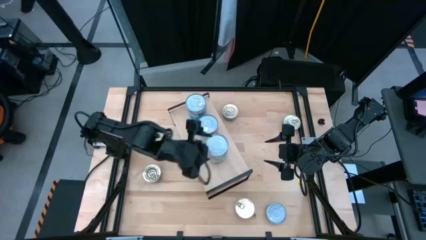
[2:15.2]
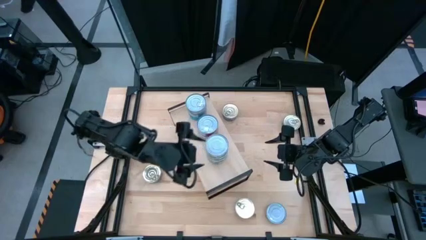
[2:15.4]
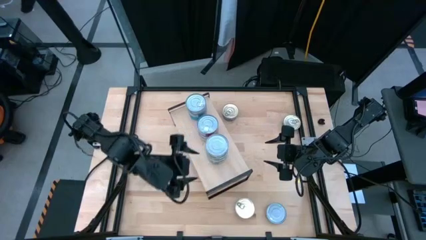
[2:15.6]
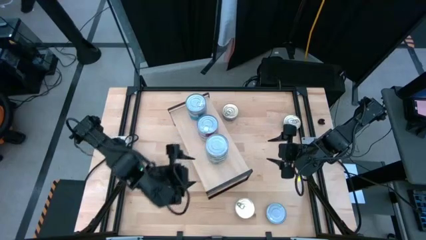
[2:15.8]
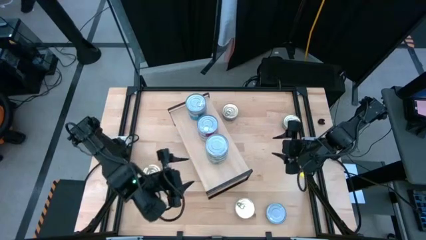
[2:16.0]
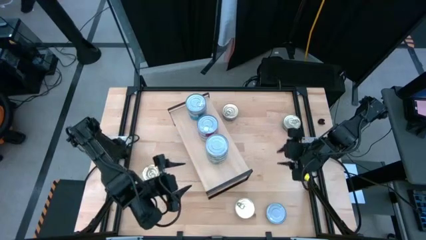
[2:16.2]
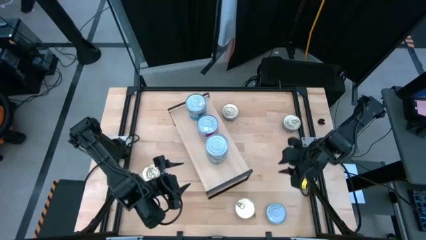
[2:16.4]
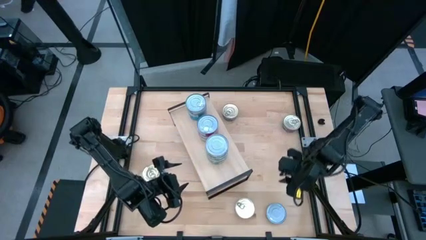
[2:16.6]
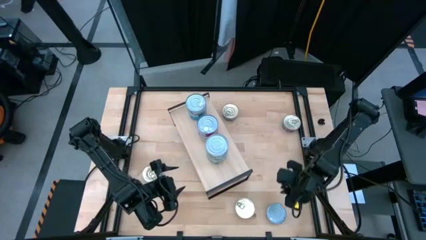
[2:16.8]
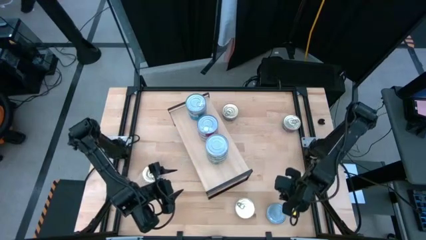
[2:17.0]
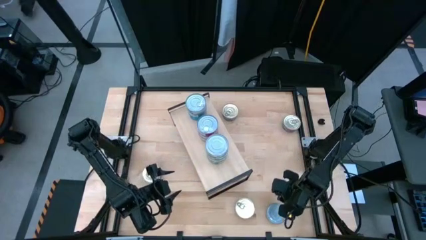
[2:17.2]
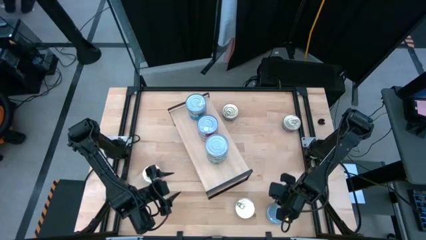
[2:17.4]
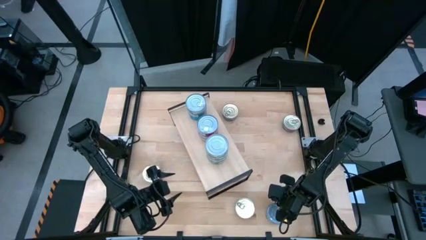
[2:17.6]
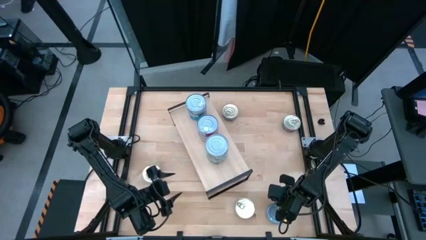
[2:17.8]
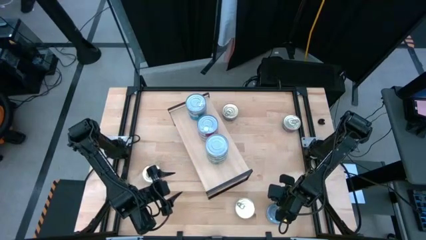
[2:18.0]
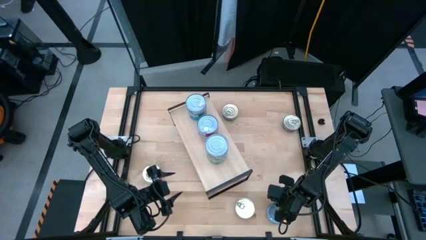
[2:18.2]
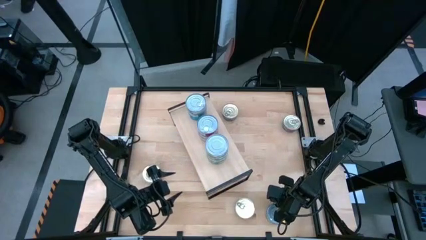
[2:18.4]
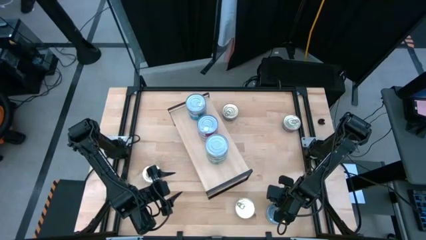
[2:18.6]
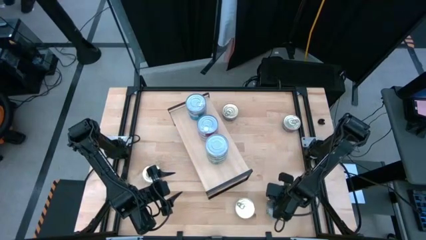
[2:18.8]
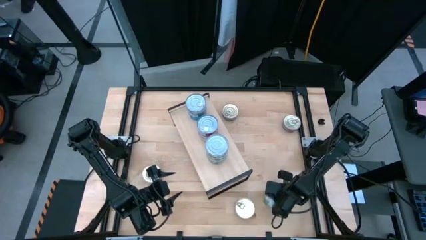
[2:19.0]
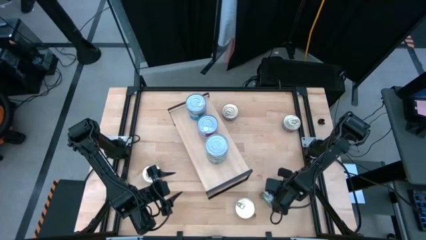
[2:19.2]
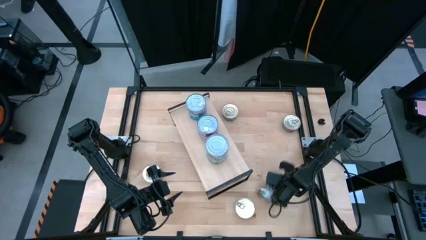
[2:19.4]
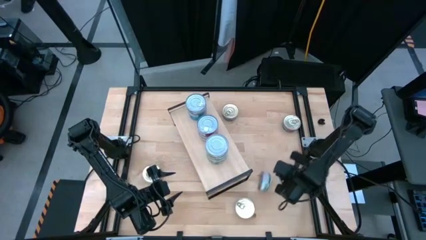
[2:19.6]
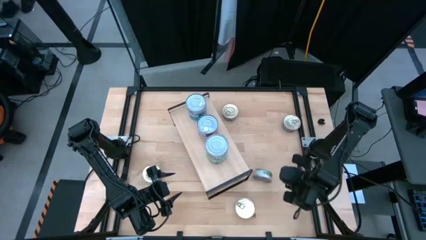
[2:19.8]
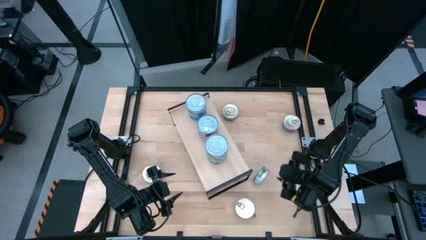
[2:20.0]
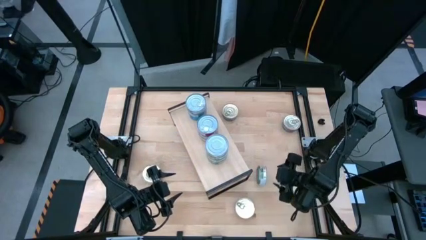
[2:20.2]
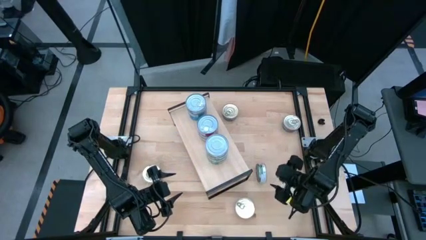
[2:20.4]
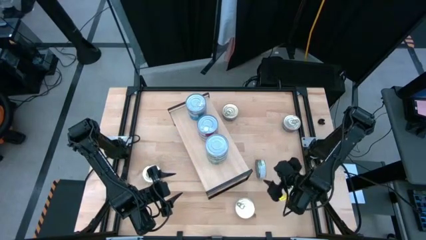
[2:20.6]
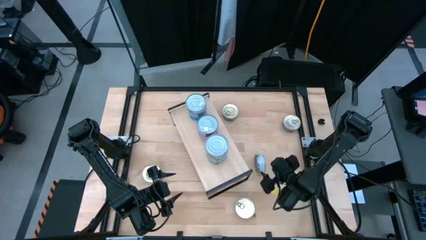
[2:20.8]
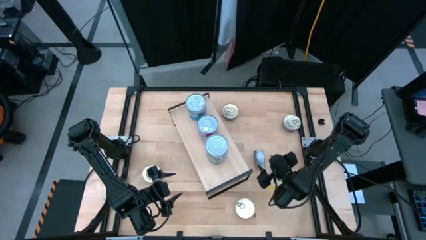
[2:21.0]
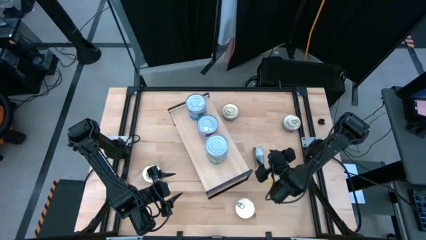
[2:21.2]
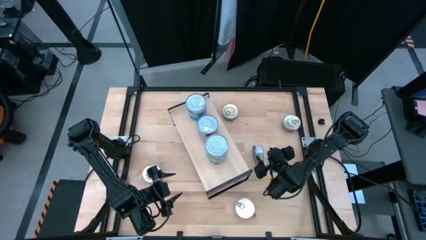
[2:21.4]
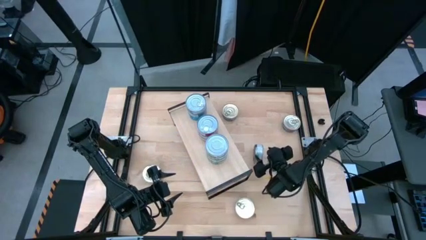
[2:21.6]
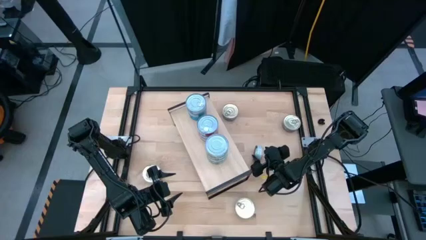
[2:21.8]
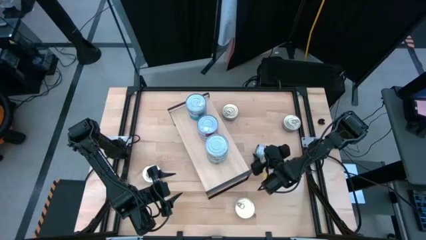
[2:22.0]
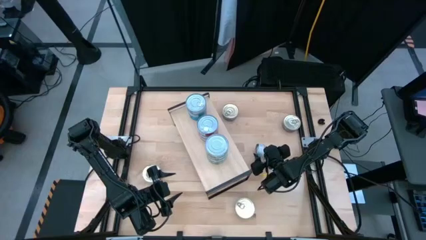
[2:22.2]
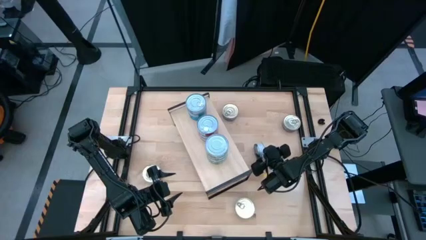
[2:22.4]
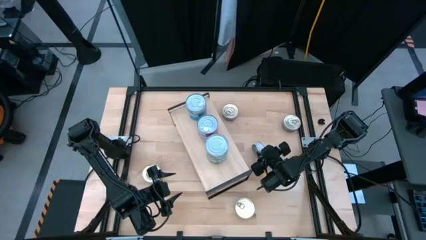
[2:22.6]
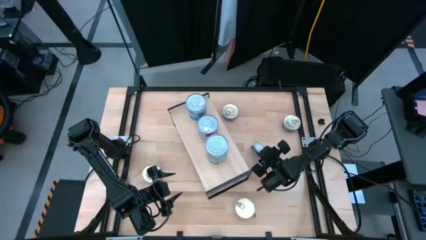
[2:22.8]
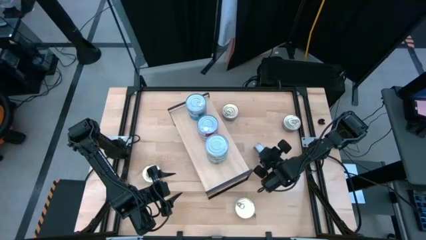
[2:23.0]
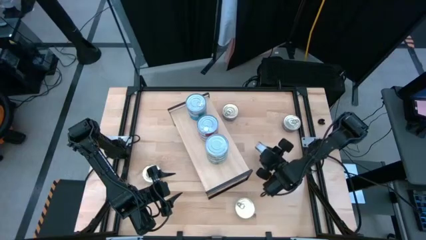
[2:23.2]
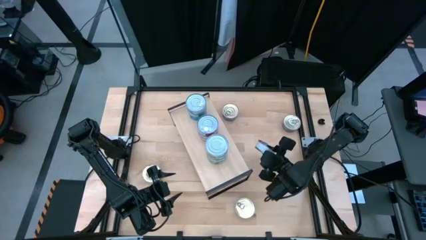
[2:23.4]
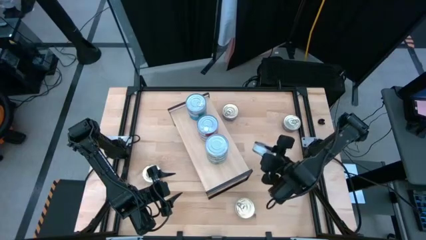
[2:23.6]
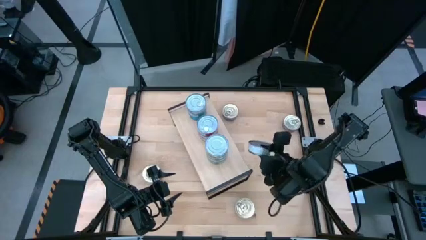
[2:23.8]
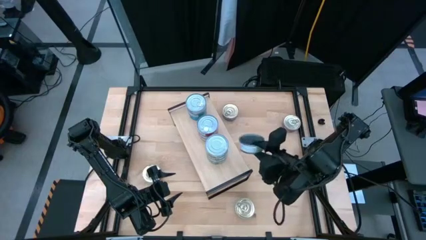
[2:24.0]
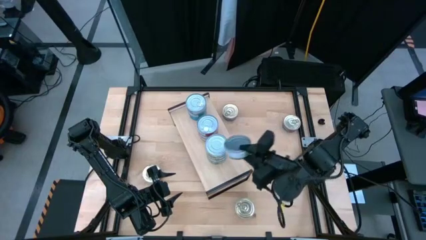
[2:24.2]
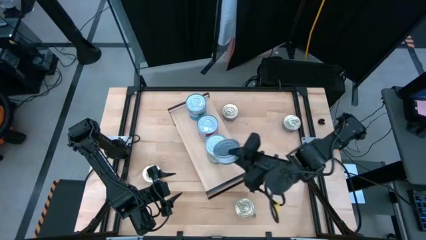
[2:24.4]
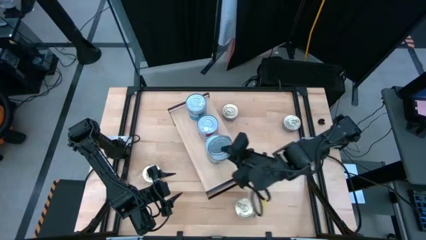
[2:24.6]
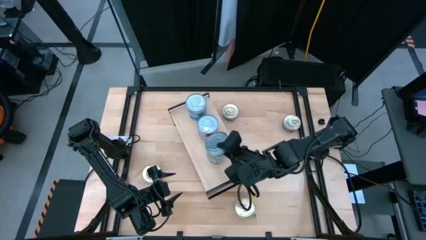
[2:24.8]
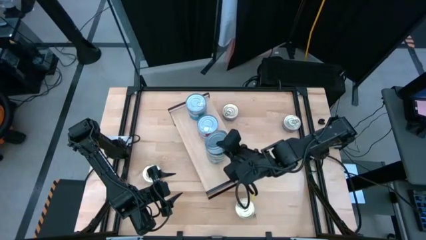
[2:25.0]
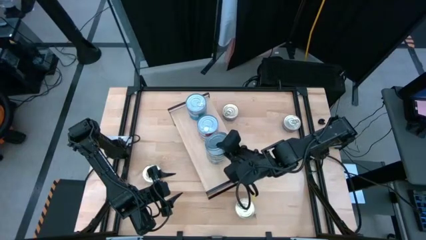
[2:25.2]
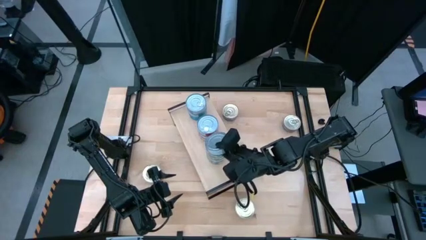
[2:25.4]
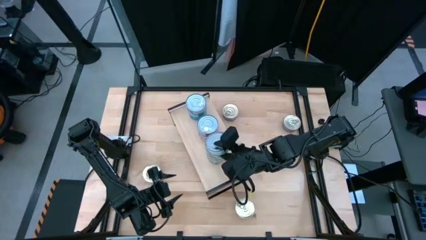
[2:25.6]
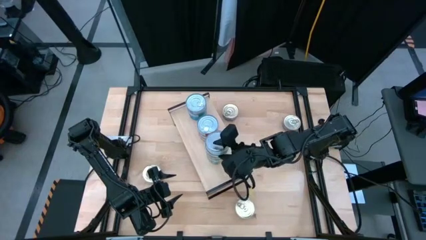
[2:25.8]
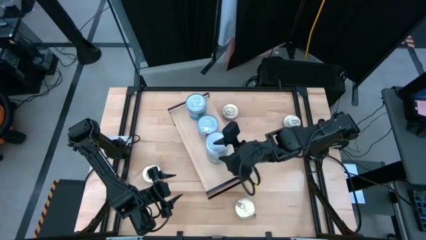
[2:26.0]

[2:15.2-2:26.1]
Task: Stack canned seafood by type on shelf
Stack the green tuna can on top of the green tuna cans on the shelf

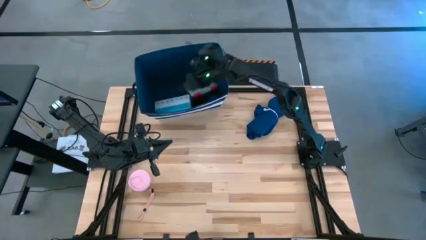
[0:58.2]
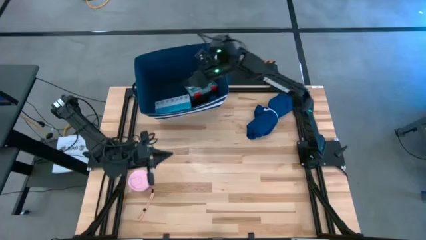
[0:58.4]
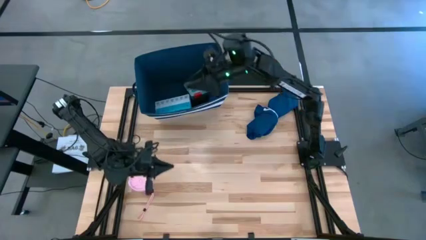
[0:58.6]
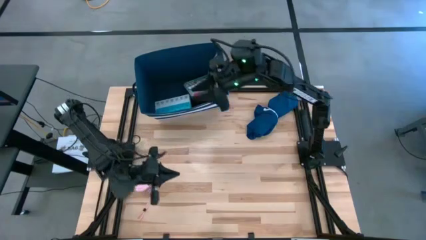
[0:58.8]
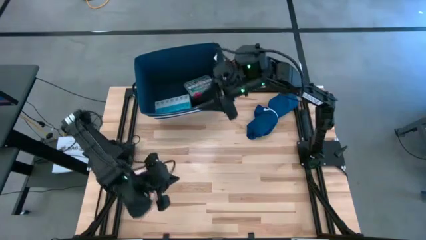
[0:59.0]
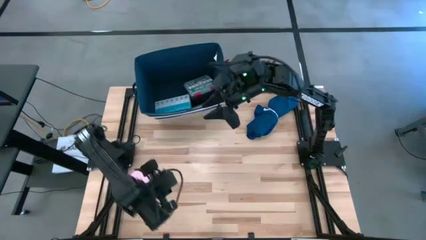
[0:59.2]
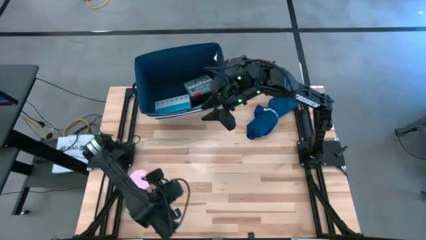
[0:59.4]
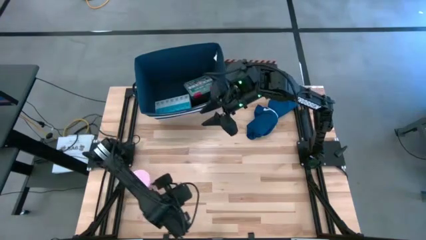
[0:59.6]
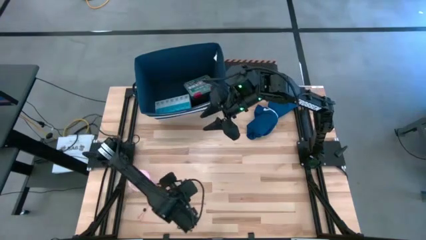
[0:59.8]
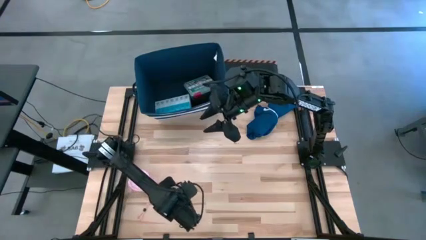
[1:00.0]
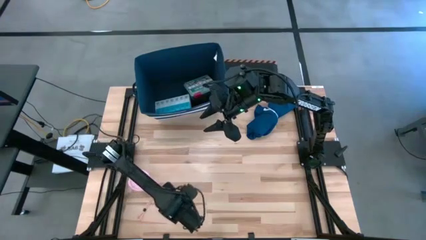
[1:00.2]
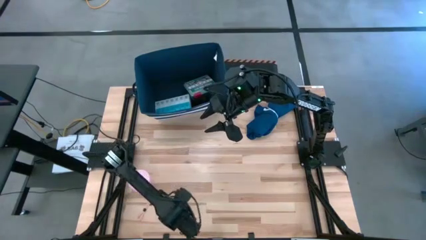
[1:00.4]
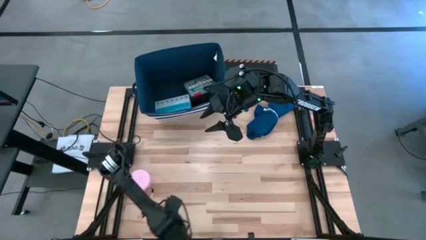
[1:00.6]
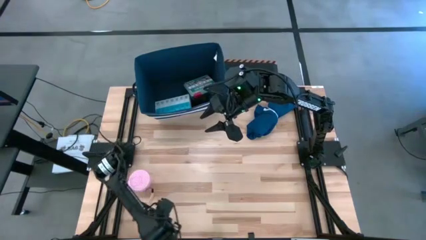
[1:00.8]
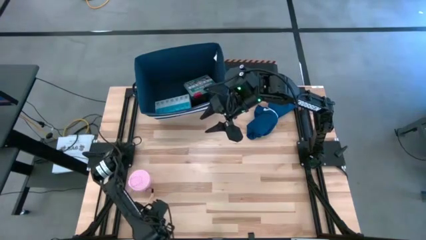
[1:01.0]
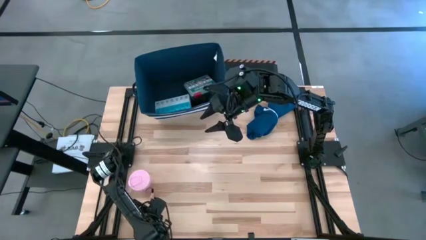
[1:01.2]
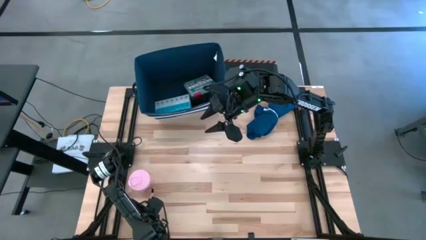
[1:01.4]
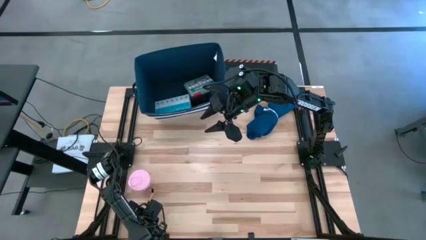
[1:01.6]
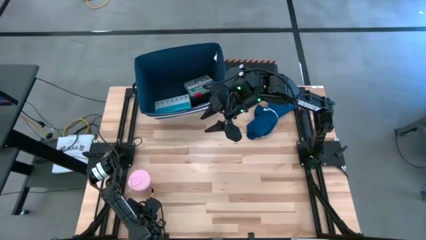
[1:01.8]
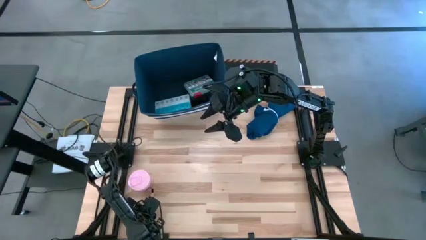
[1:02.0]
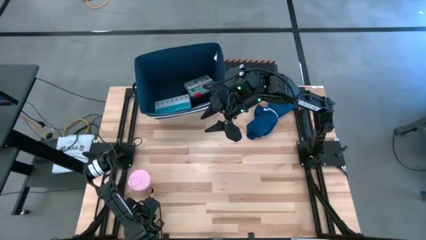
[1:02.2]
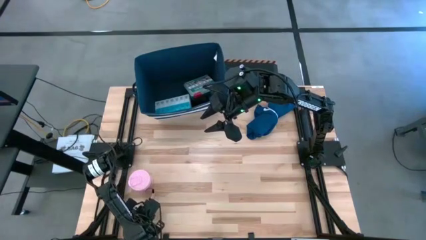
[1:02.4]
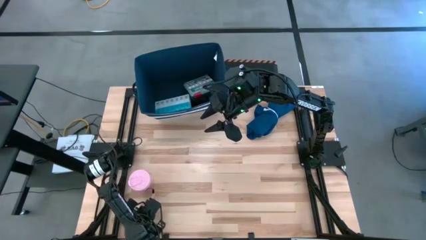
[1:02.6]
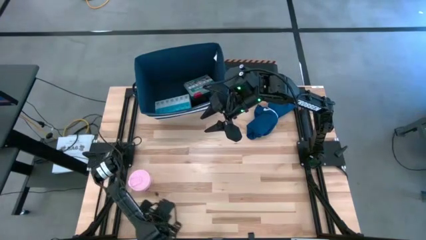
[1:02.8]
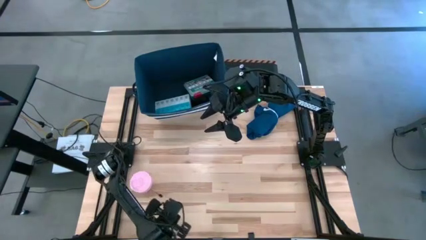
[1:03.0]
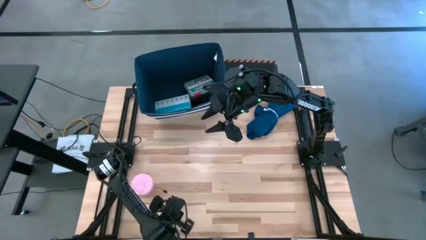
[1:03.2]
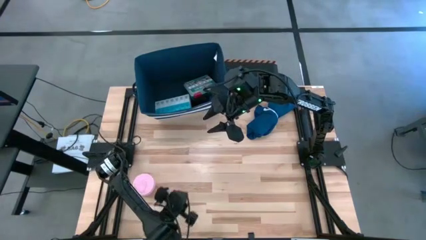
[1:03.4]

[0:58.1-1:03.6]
Task: Pick & place medical supplies in basket/bin
Put the pink tumbler into the blue bin
